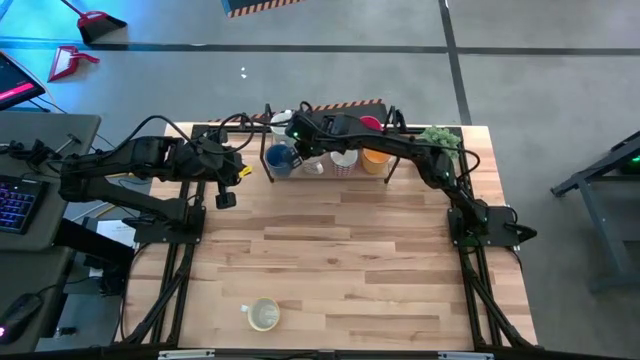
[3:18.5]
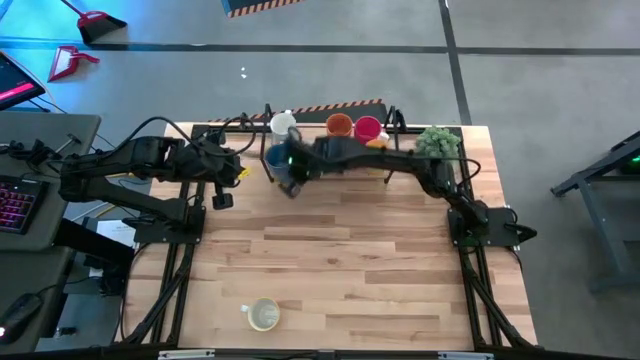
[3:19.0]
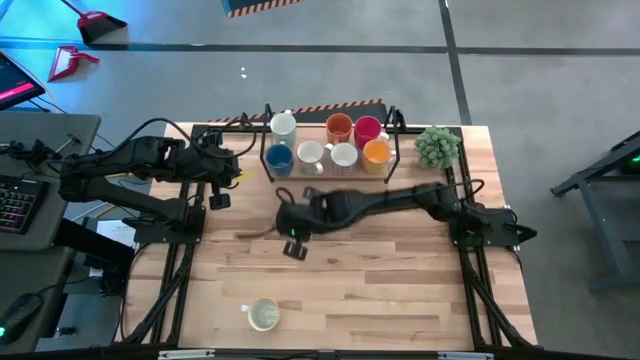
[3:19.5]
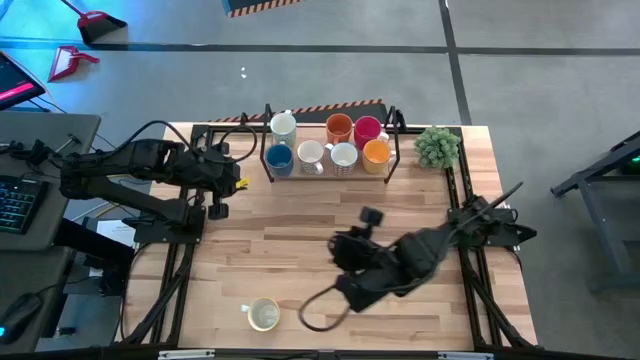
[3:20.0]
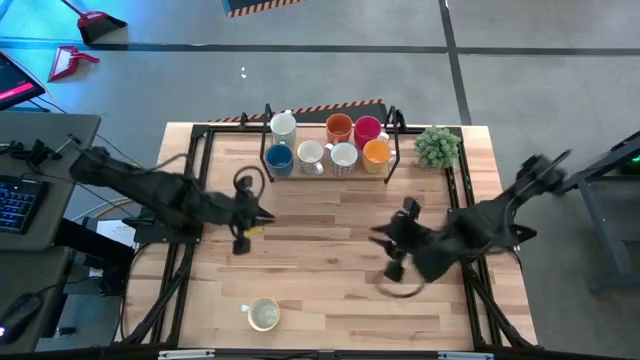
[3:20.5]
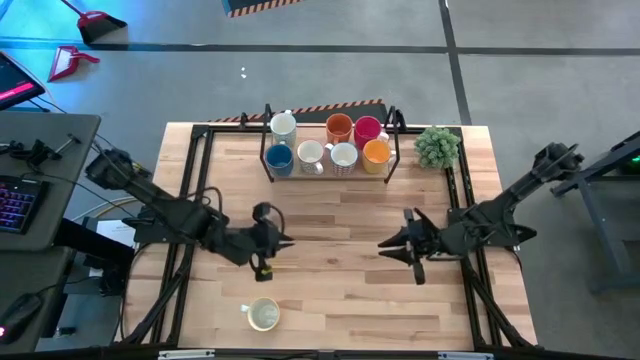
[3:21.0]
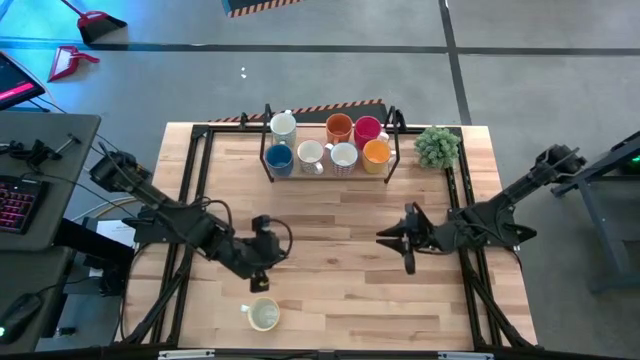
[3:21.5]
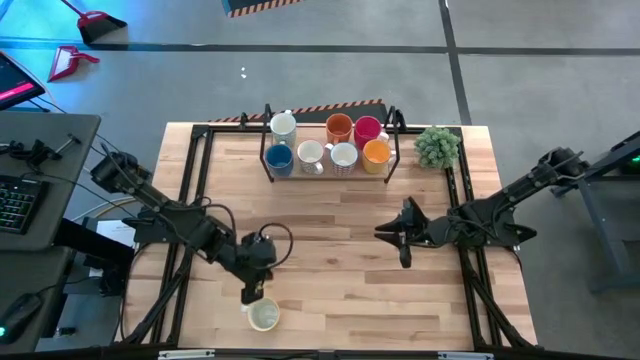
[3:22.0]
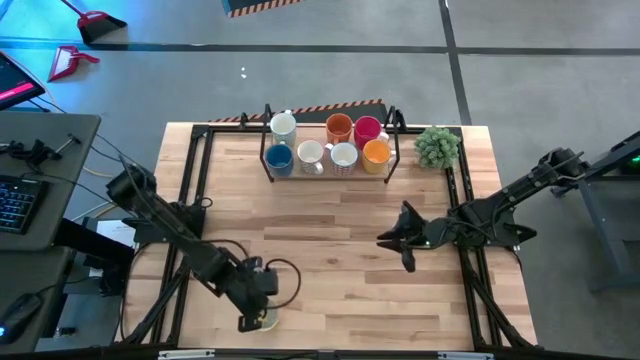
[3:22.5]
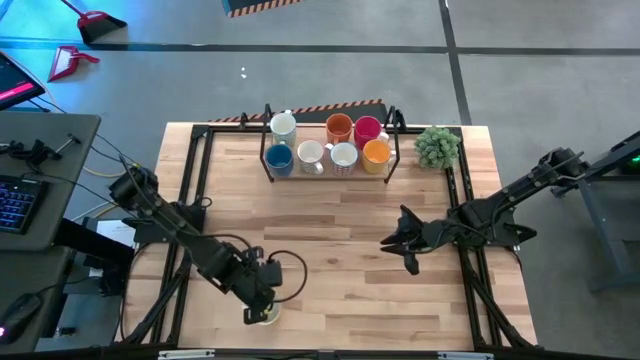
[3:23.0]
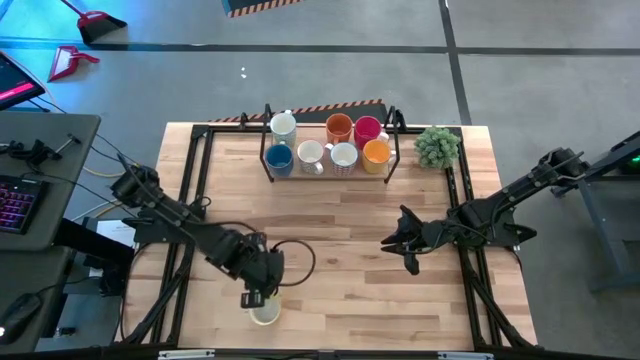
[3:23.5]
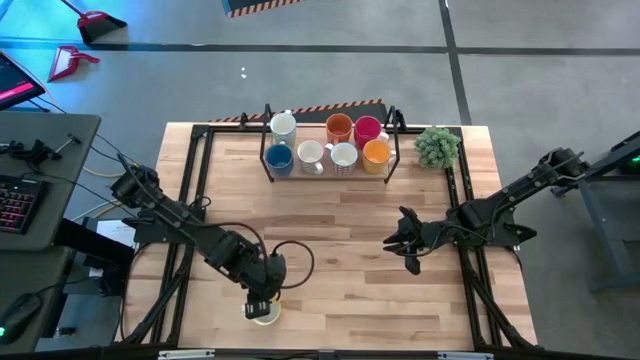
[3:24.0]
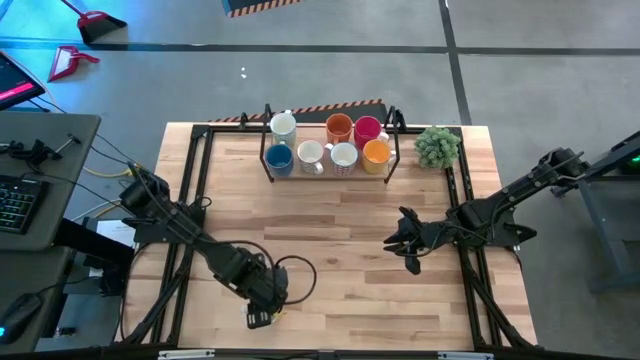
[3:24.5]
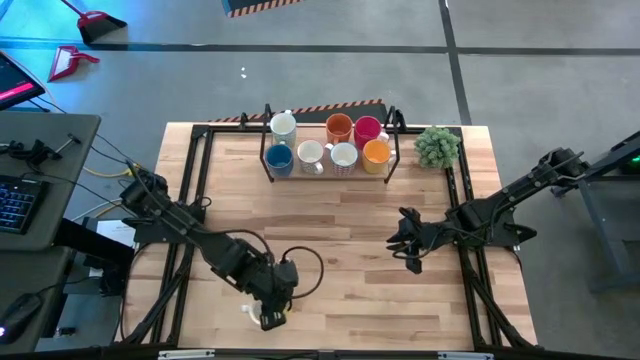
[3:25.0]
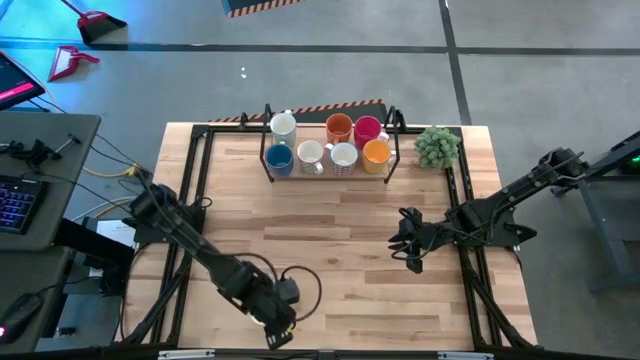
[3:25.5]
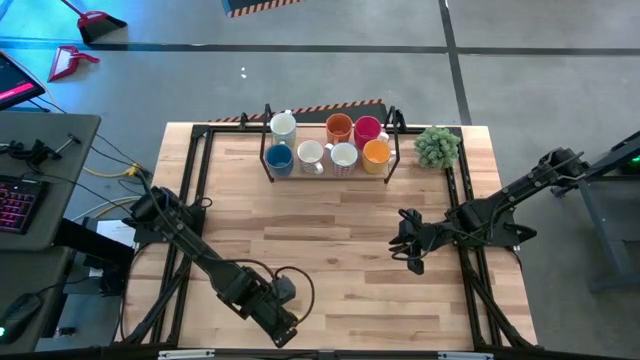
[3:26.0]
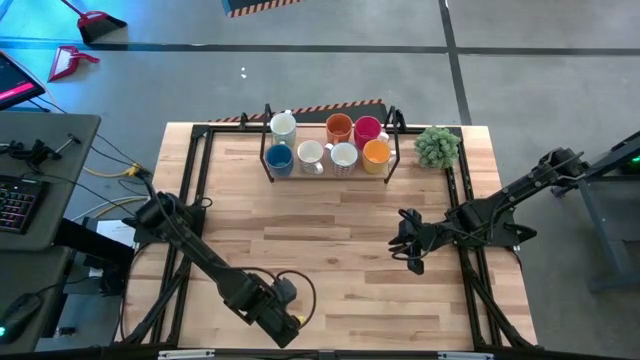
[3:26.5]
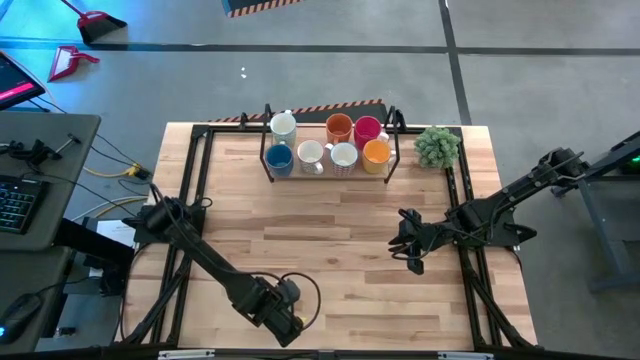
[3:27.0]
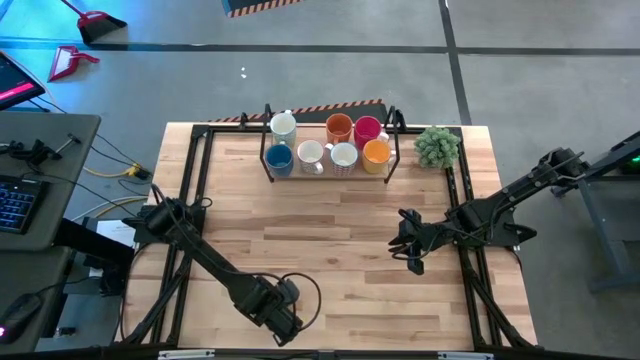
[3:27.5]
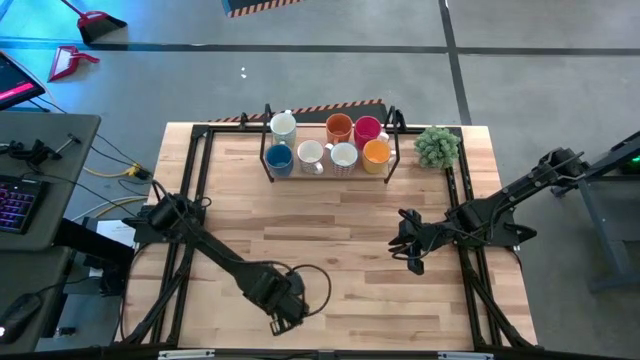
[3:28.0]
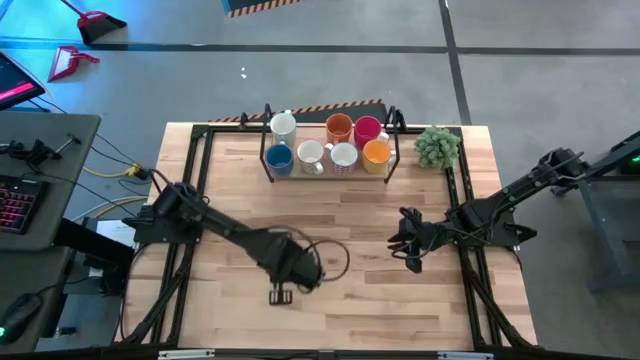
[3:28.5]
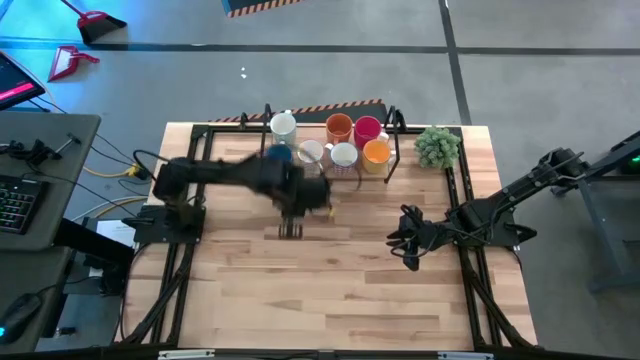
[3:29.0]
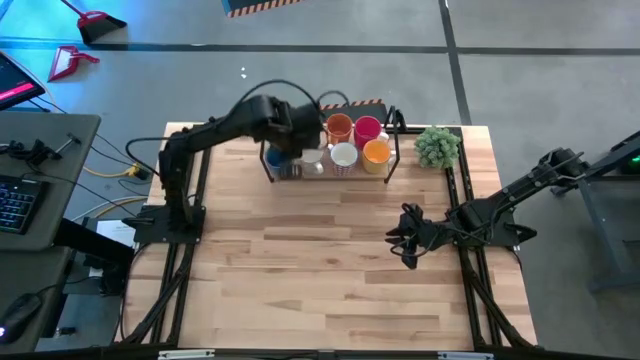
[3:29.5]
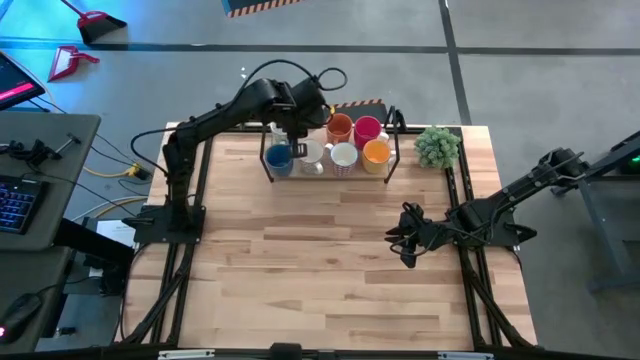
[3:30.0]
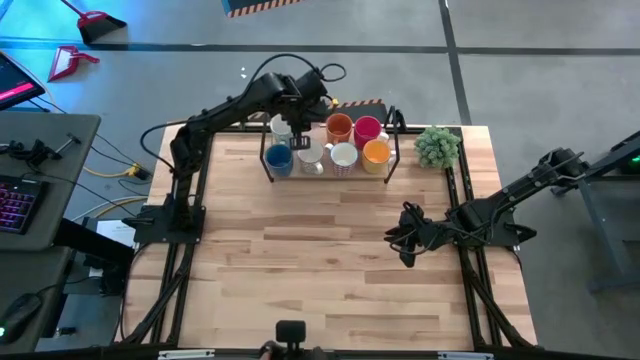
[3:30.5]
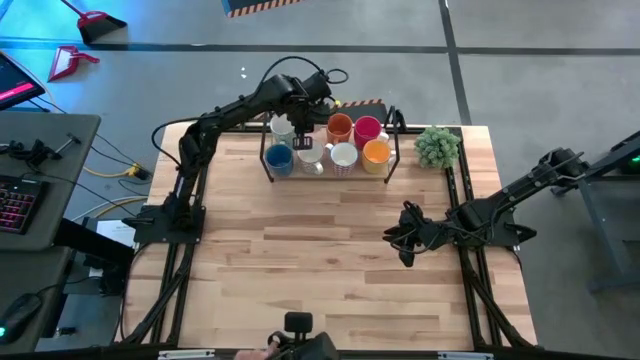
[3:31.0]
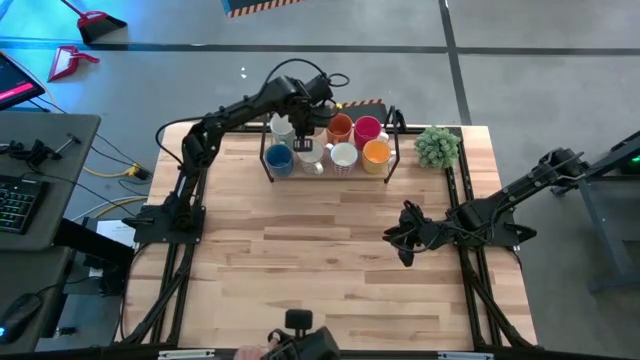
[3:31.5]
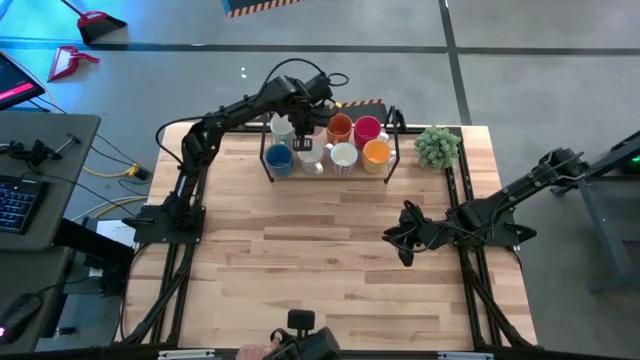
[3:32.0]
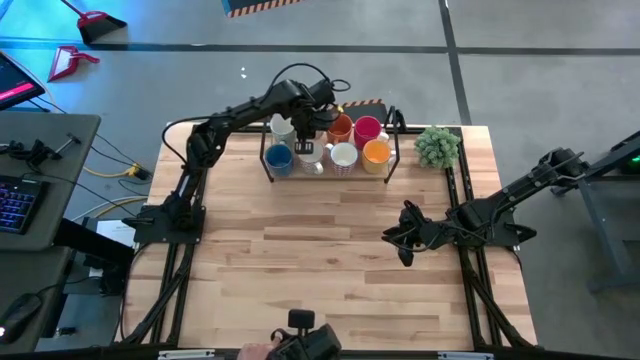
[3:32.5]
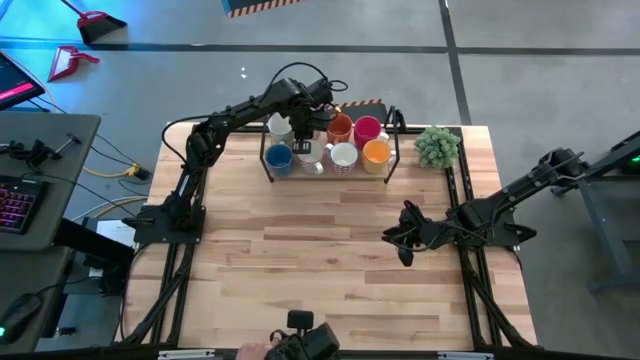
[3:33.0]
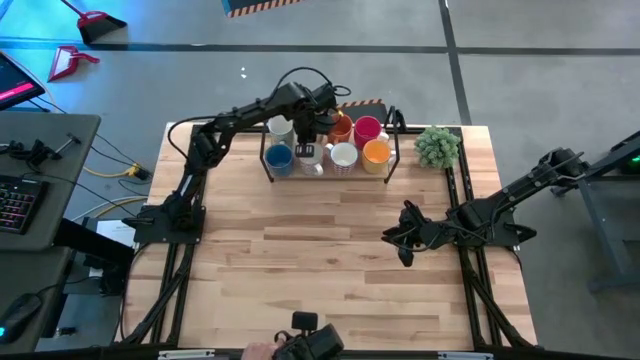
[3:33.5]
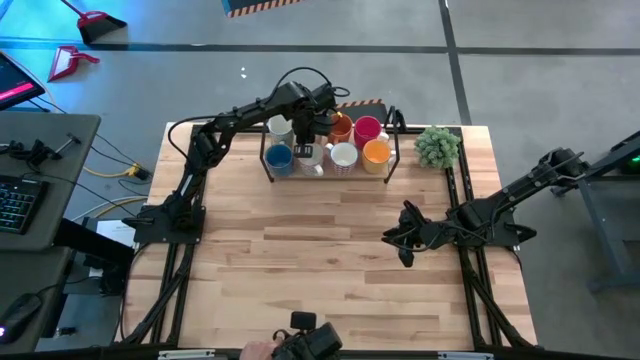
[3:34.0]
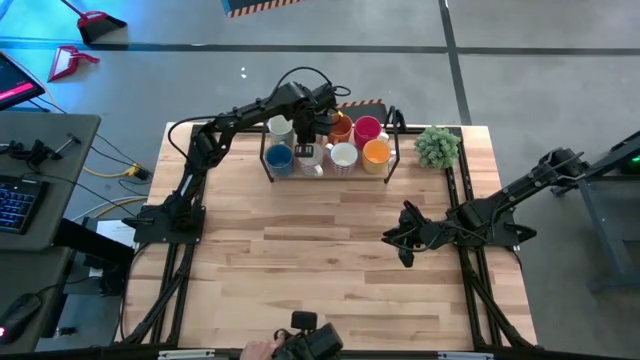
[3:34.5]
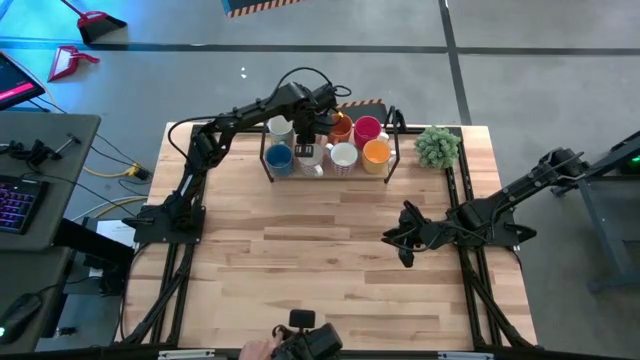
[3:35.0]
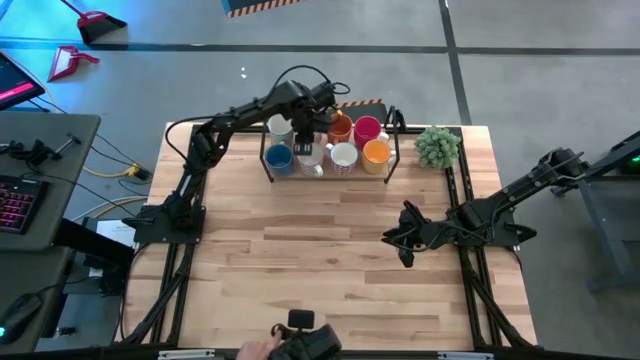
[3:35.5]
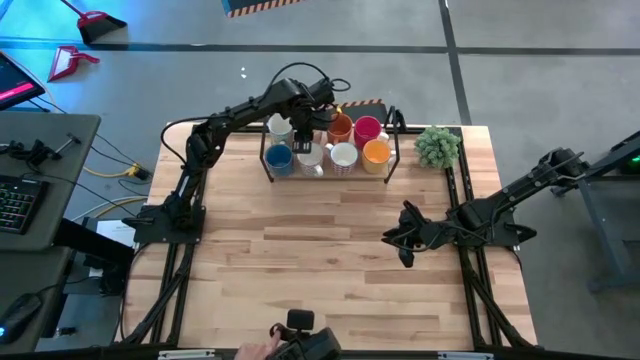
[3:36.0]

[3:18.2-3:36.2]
Task: Place coffee mugs
Put the white yellow mug on the shelf

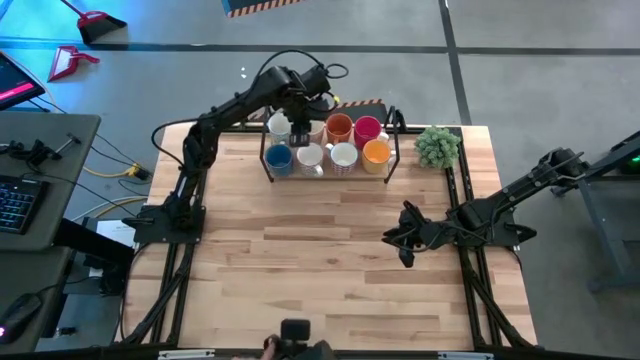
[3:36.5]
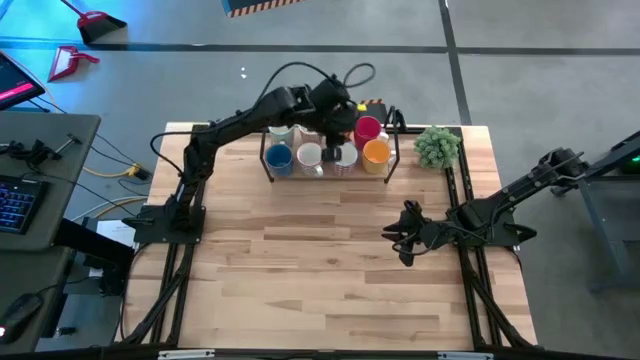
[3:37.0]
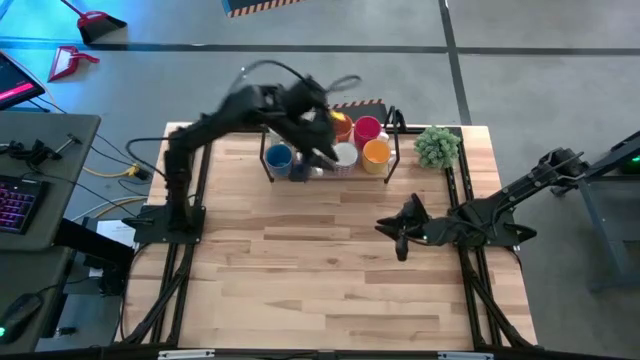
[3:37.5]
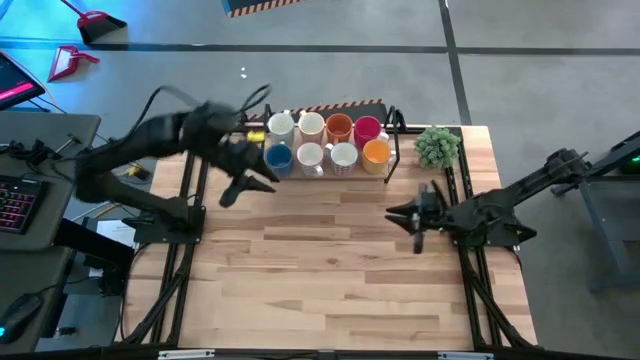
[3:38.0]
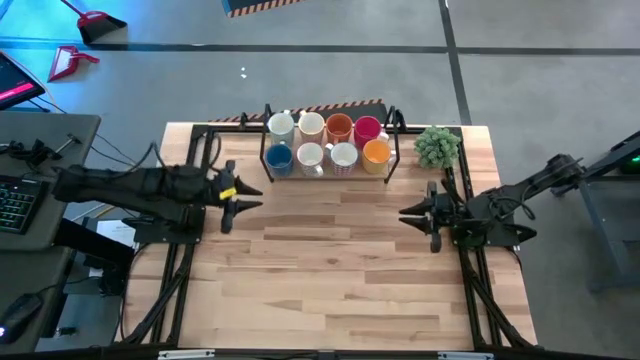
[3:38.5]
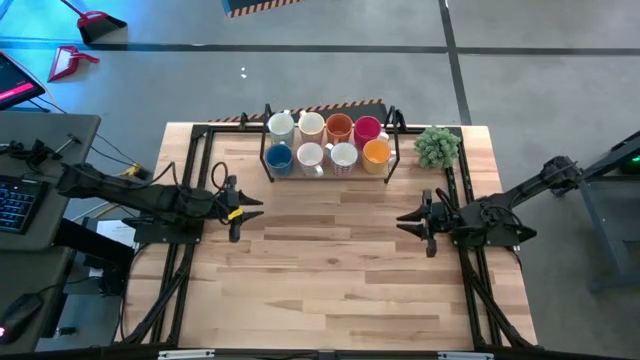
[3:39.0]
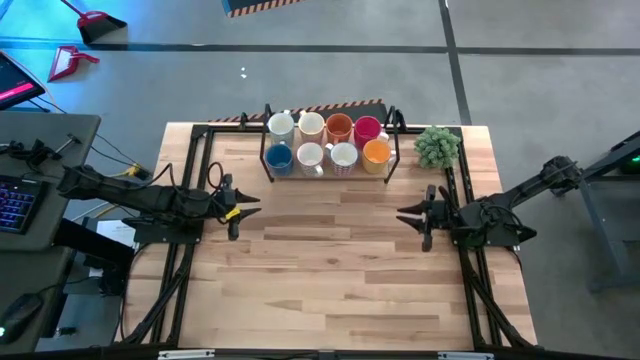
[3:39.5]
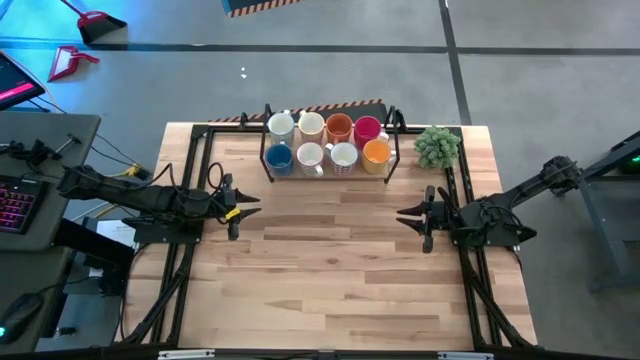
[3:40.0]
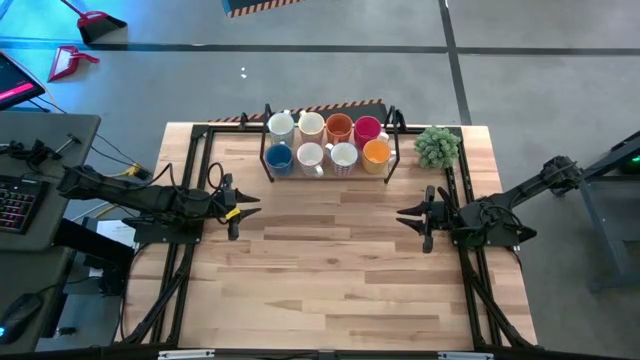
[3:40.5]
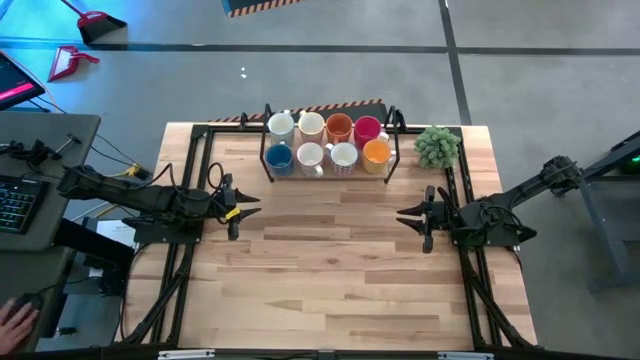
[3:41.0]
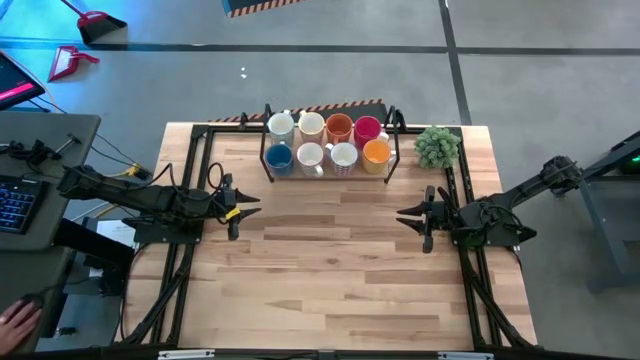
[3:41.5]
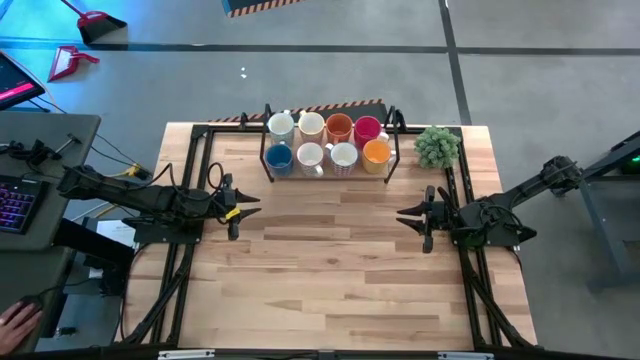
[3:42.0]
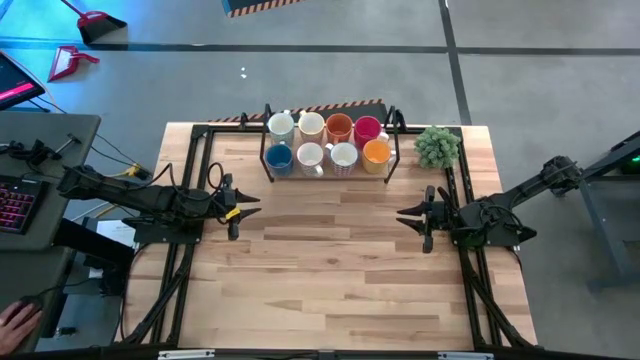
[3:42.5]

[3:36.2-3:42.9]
Return to Home Position
